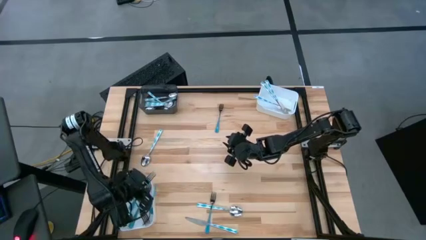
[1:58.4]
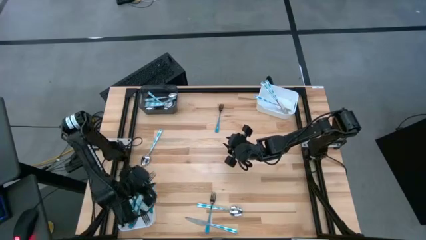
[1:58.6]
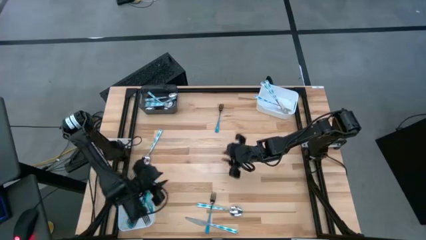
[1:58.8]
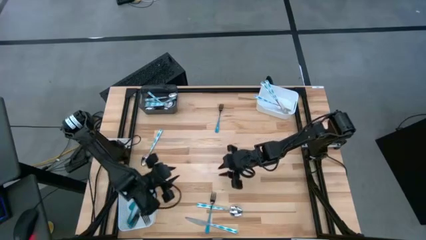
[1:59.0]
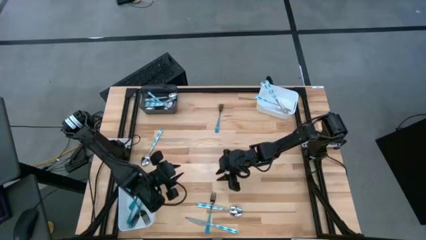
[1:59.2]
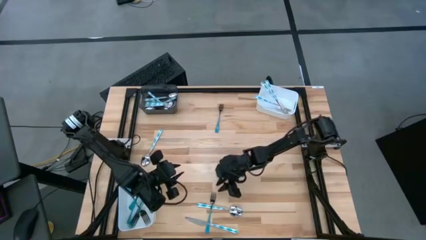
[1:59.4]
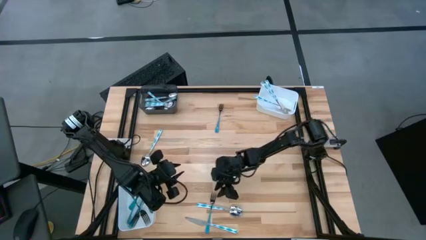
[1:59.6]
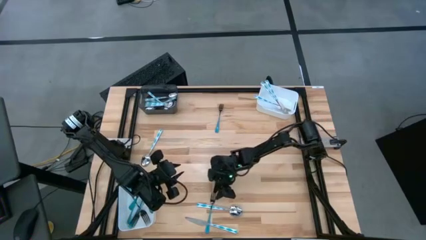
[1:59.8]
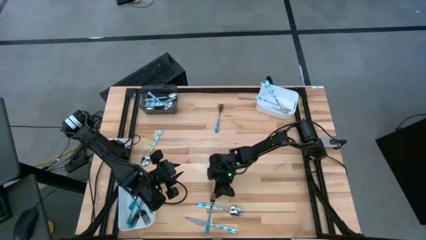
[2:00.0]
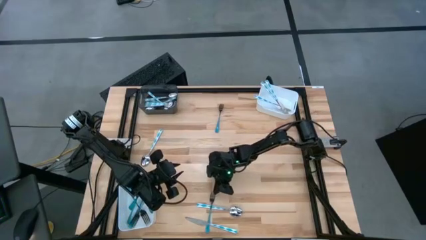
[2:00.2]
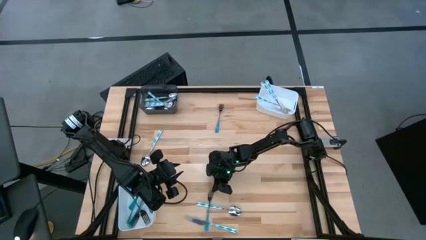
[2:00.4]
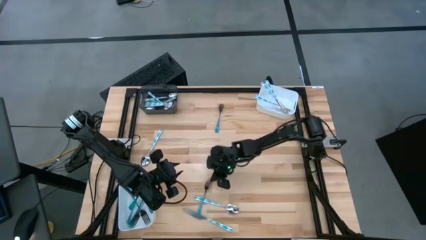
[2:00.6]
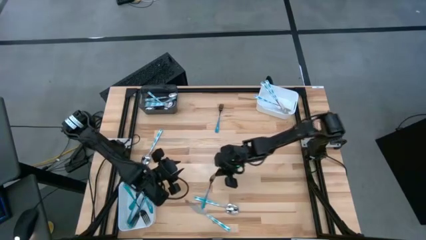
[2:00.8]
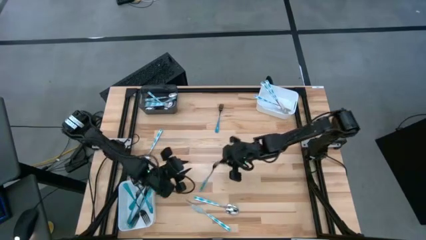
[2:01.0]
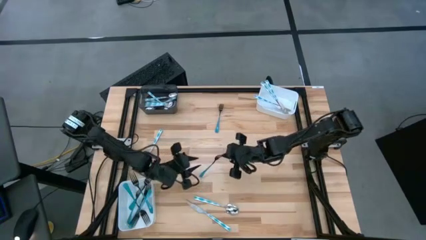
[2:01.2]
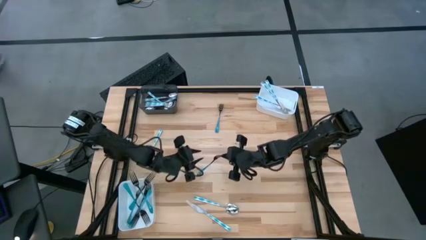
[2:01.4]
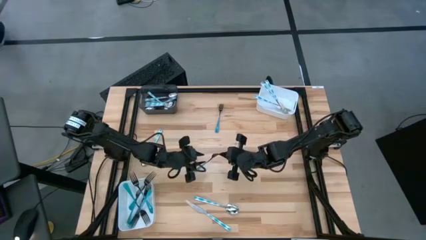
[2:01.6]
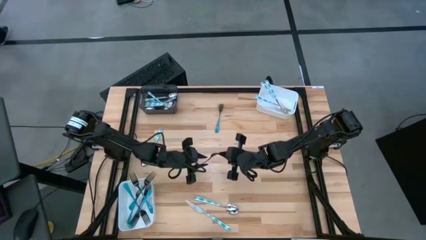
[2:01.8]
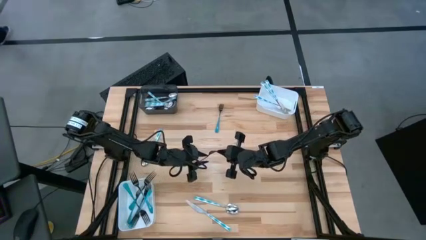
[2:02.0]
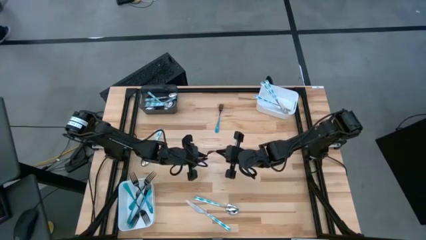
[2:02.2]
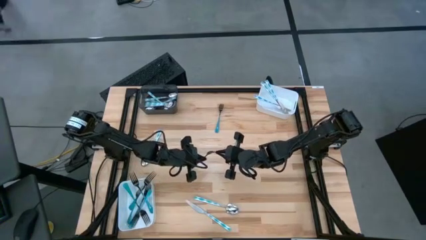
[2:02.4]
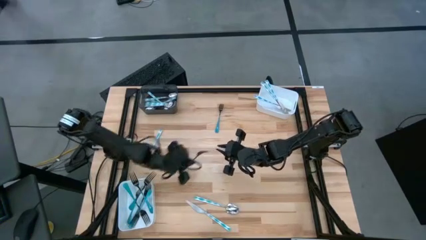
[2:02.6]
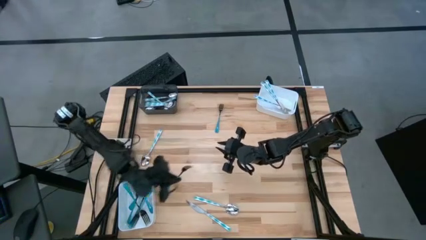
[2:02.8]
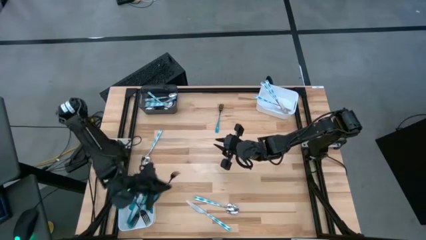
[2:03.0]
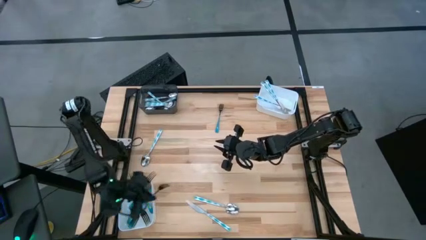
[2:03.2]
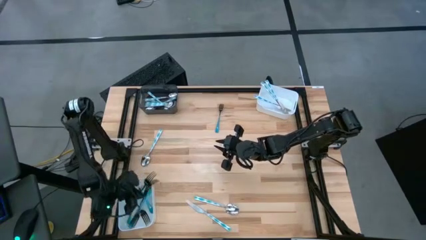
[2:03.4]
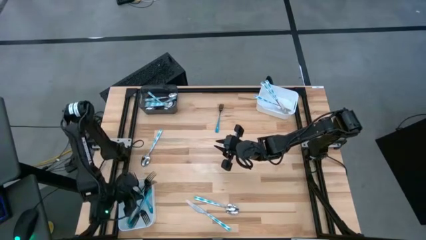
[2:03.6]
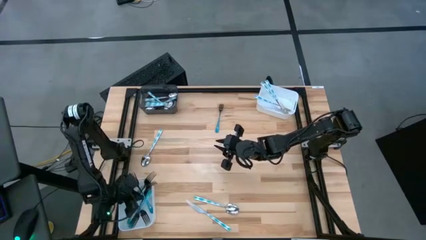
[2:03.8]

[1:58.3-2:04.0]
Task: Sort silverware by color (type)
Put the blue fork into the bottom white bin

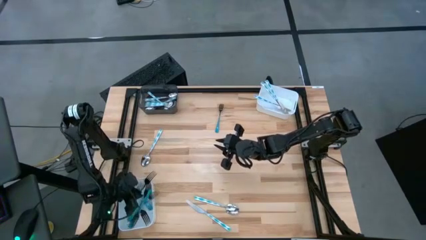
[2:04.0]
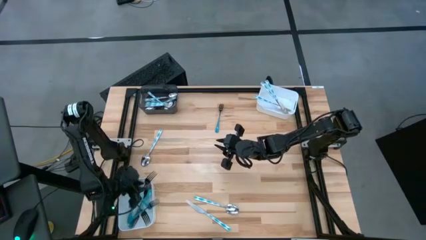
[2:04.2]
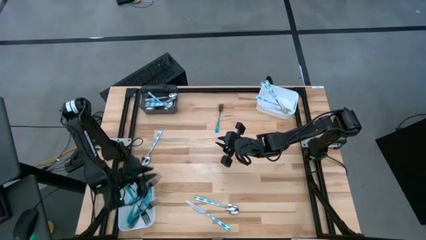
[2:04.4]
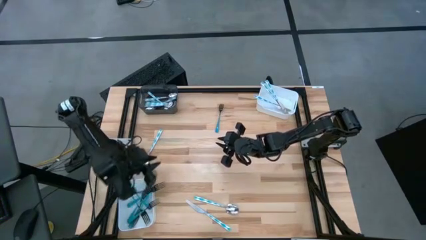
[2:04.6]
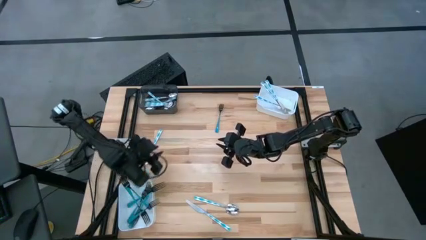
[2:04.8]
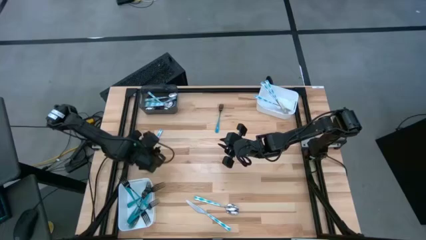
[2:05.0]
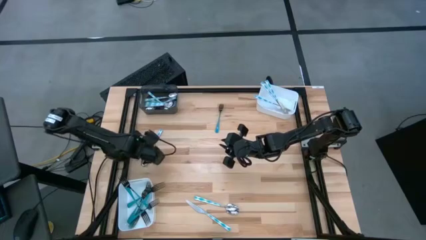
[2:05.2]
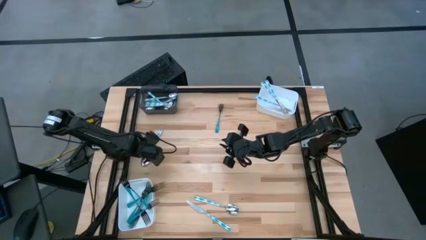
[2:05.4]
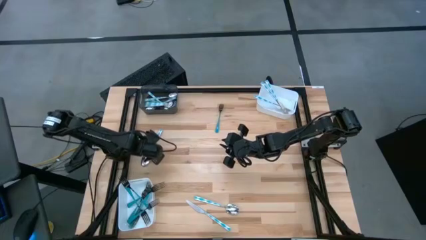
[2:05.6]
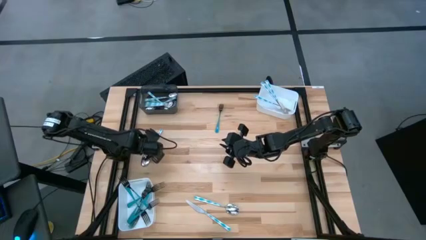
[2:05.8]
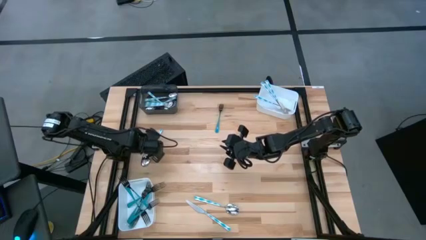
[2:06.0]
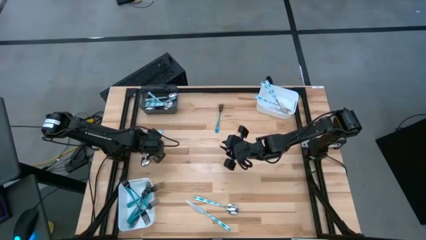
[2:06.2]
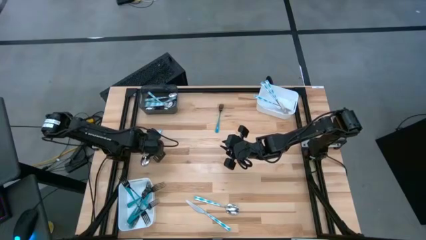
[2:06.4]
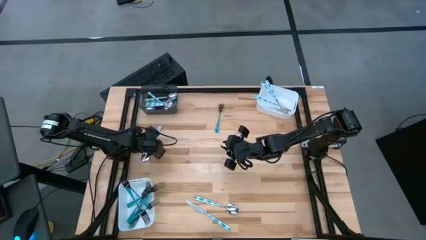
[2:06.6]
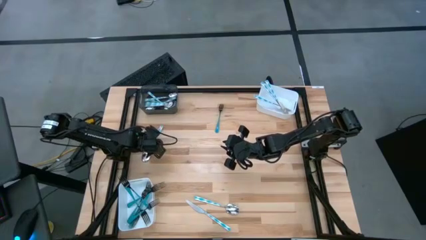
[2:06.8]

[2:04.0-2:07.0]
Put the blue patterned spoon into the black bin

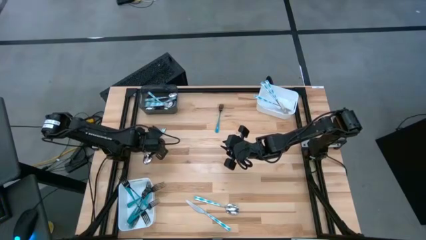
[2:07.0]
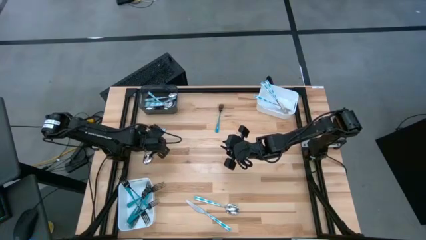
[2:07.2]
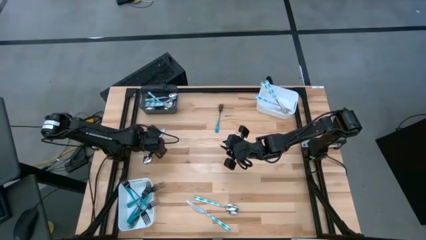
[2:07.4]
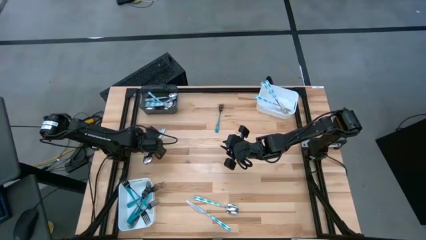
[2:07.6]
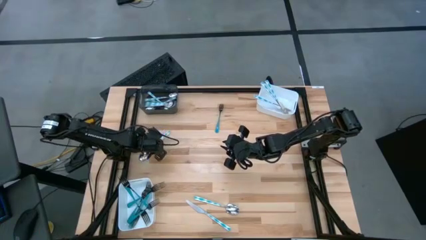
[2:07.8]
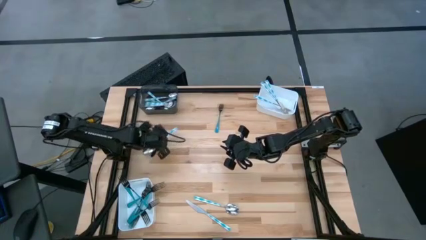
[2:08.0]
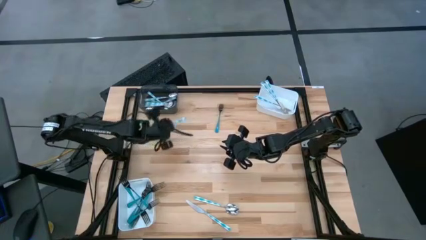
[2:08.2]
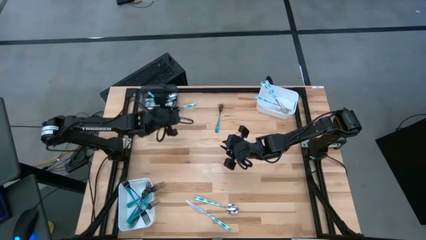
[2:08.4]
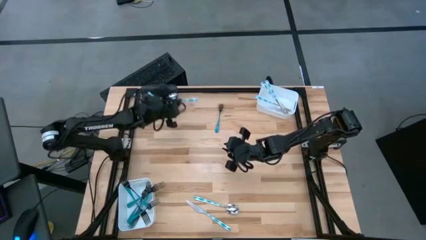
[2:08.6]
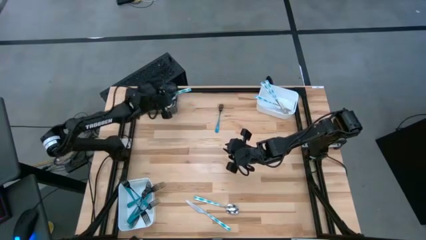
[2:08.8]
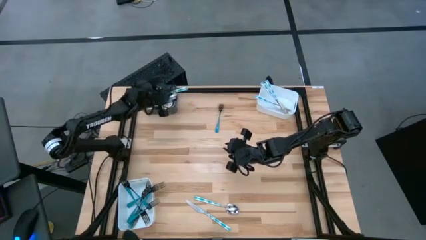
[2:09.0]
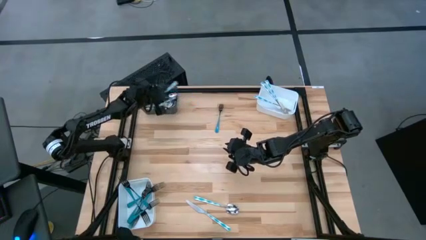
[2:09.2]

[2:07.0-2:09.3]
Put the blue patterned spoon into the black bin

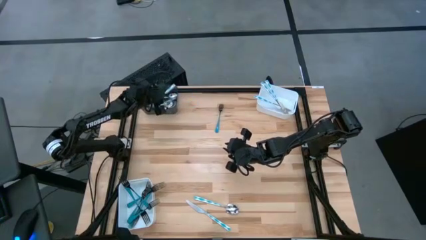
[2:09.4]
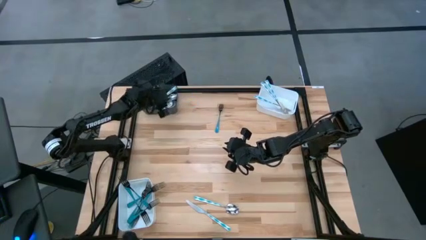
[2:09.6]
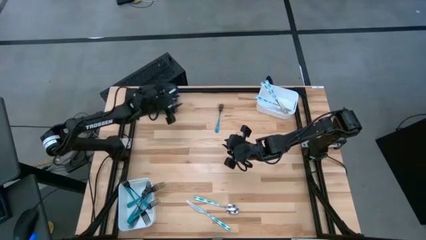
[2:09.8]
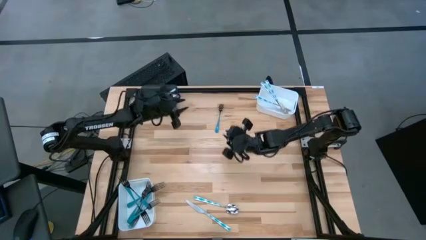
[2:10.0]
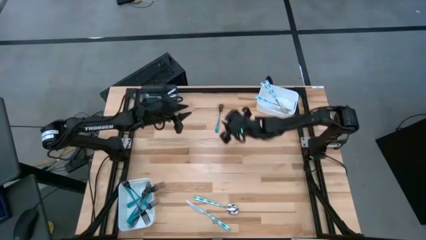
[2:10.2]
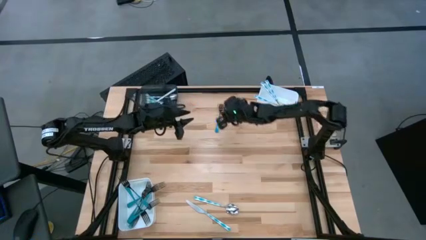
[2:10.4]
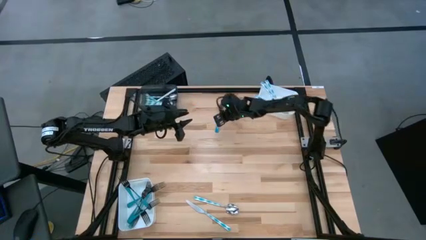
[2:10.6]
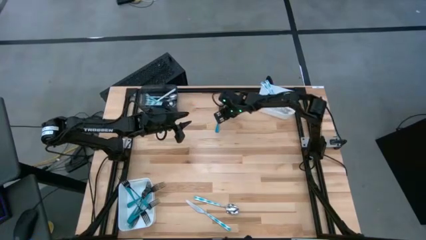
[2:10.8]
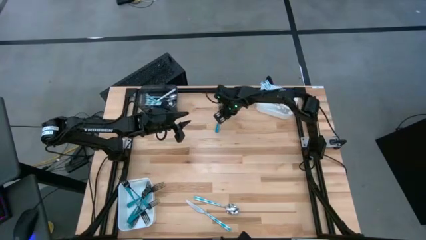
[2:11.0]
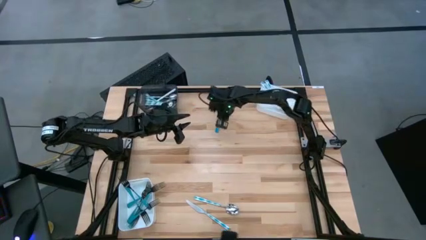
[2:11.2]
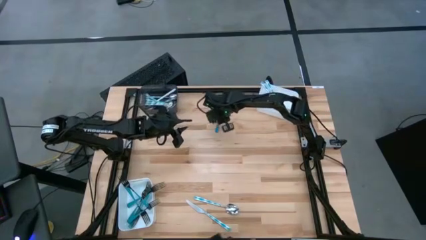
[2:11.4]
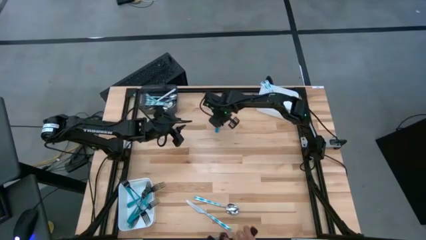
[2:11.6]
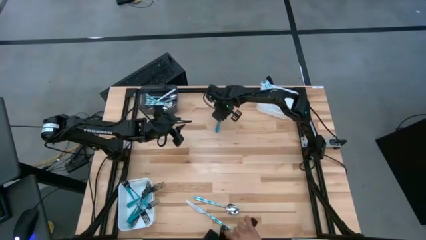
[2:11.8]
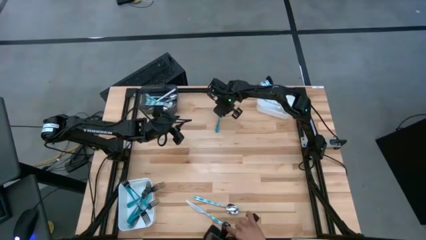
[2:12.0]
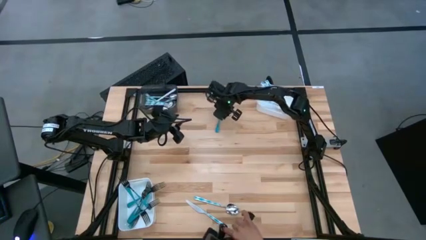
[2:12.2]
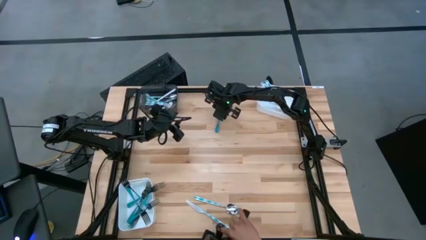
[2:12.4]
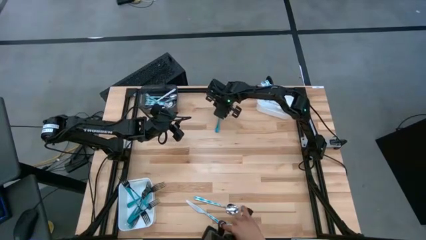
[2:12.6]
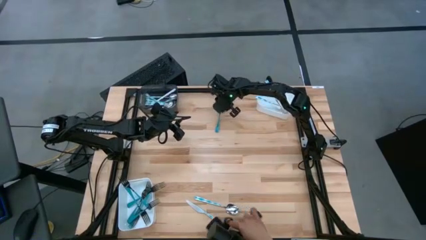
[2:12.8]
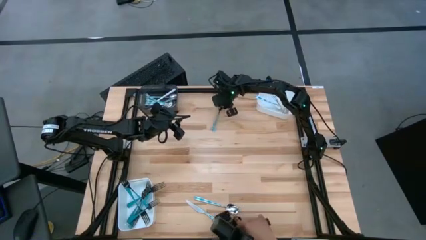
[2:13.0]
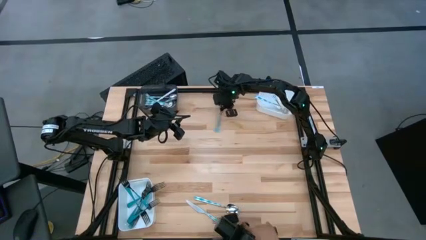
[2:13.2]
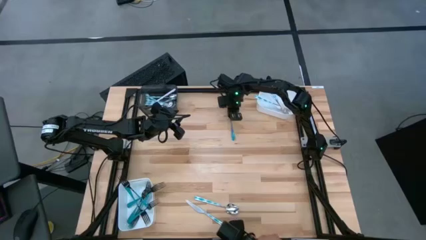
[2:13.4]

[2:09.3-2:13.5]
Put the blue fork into the bottom white bin
